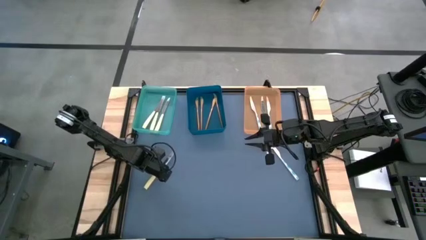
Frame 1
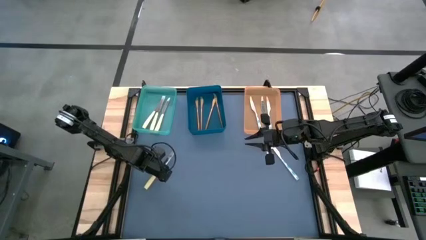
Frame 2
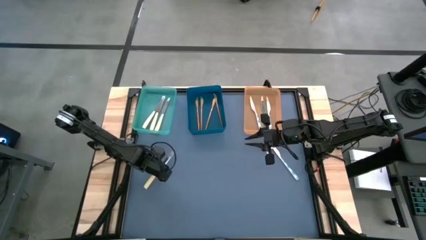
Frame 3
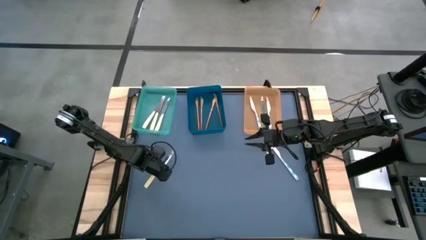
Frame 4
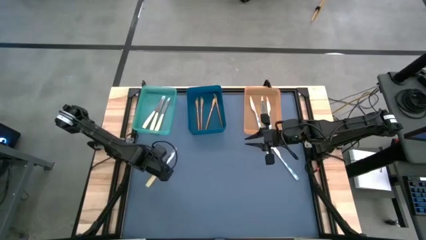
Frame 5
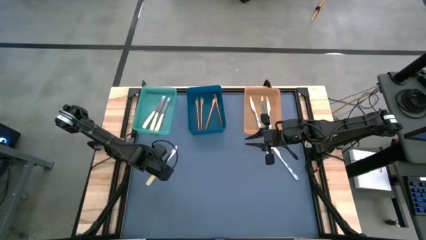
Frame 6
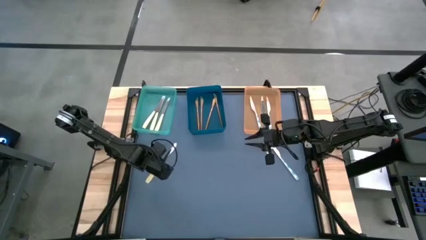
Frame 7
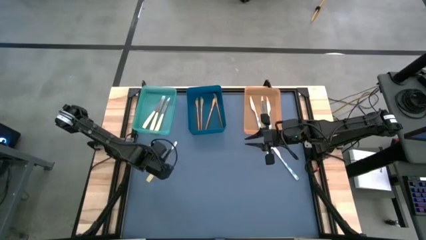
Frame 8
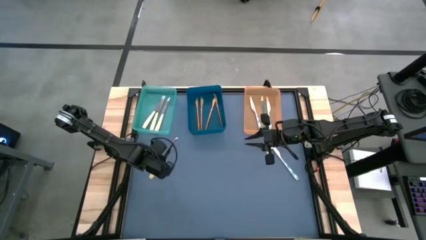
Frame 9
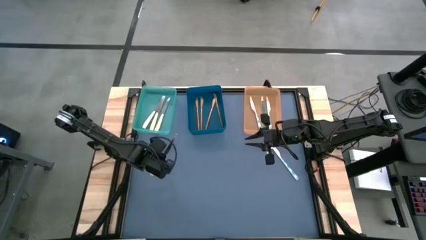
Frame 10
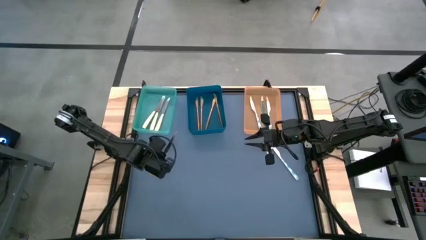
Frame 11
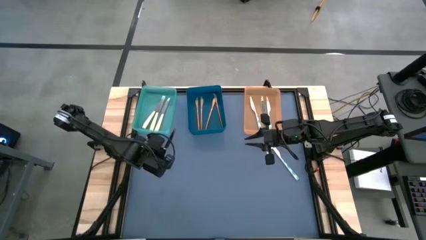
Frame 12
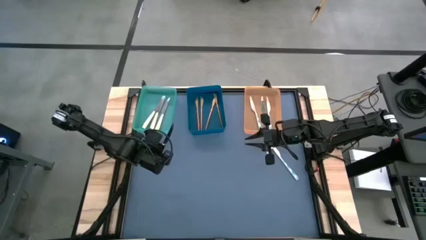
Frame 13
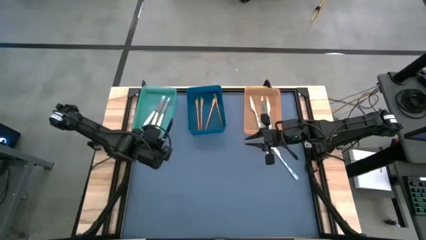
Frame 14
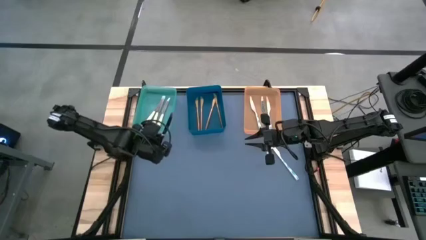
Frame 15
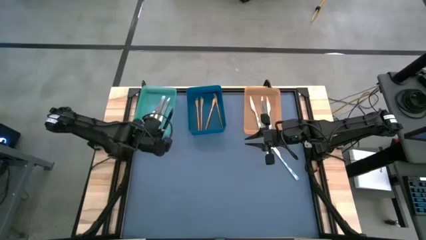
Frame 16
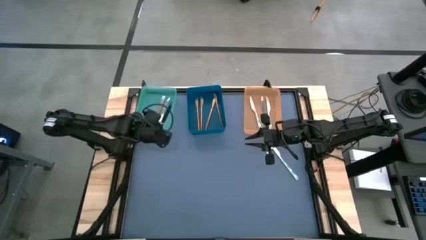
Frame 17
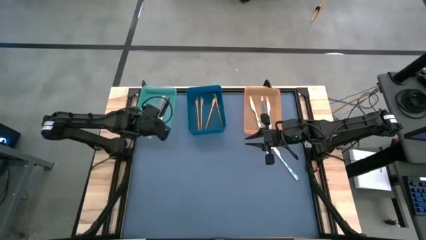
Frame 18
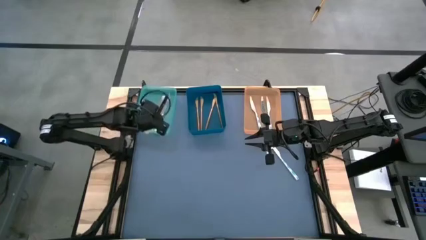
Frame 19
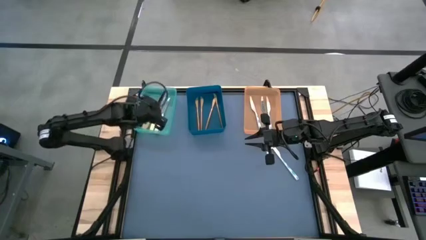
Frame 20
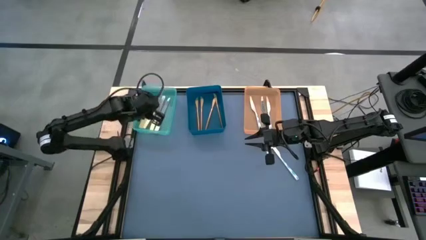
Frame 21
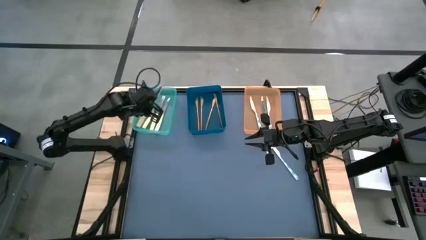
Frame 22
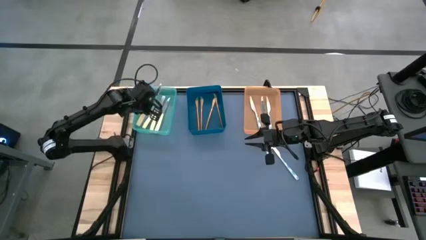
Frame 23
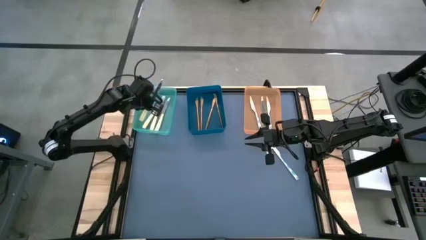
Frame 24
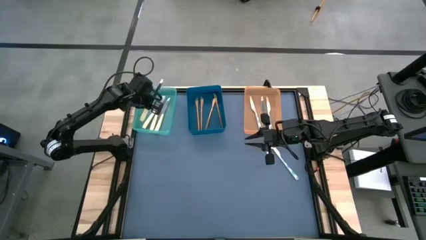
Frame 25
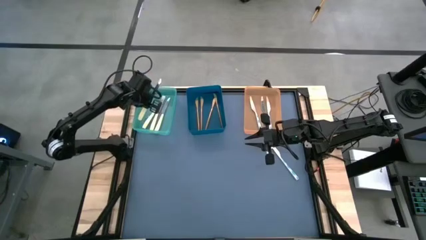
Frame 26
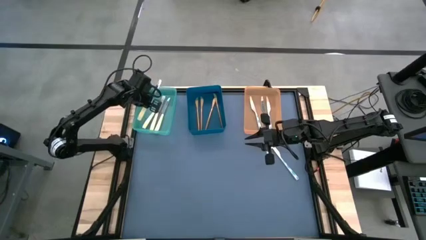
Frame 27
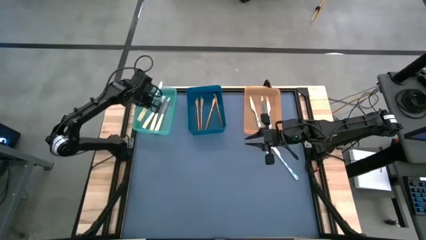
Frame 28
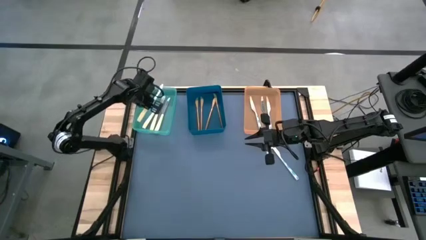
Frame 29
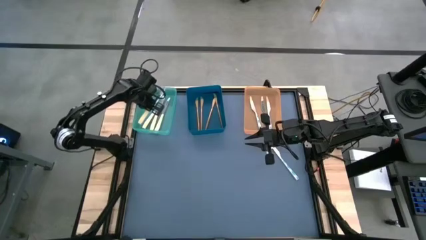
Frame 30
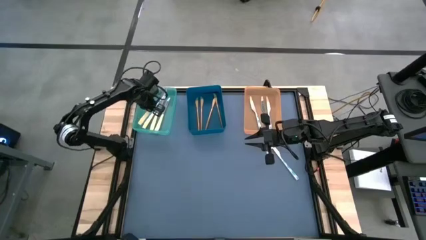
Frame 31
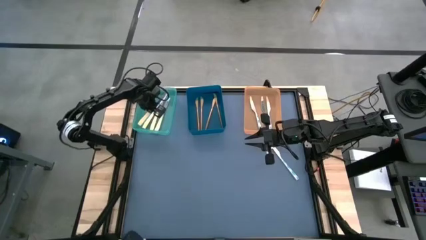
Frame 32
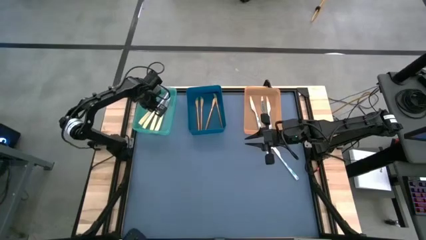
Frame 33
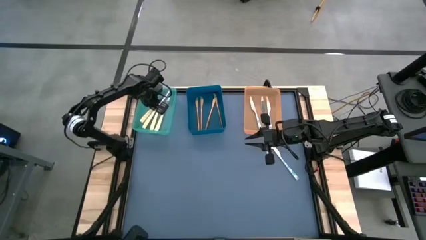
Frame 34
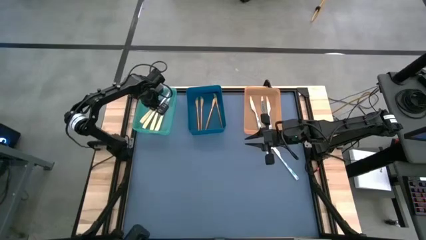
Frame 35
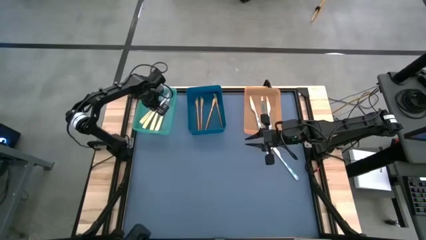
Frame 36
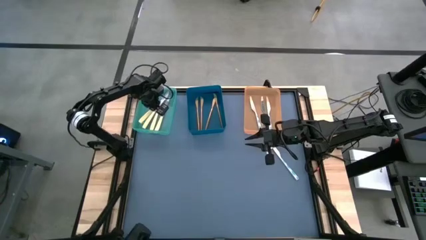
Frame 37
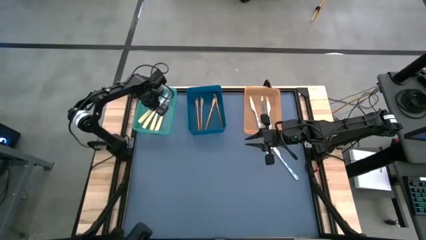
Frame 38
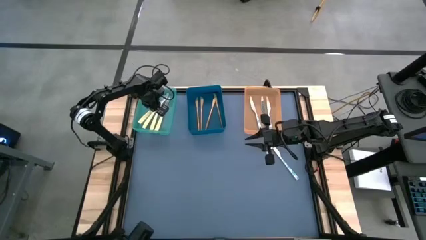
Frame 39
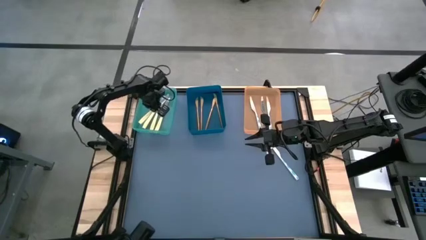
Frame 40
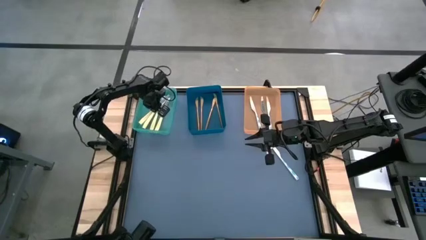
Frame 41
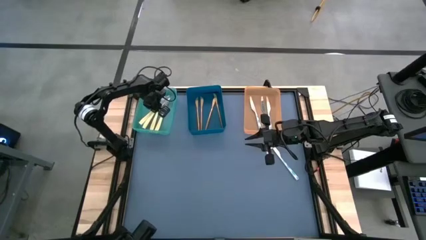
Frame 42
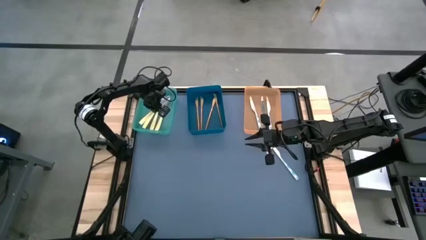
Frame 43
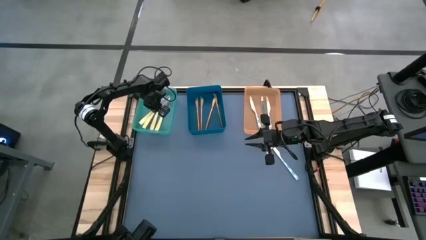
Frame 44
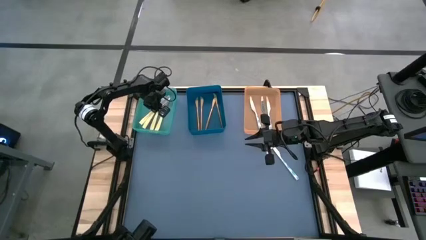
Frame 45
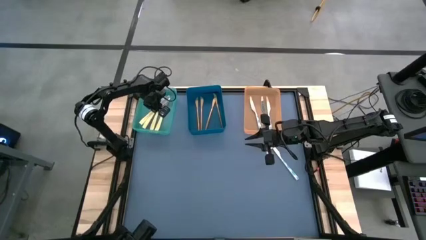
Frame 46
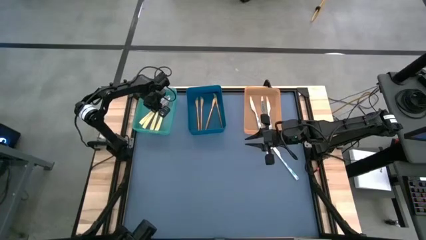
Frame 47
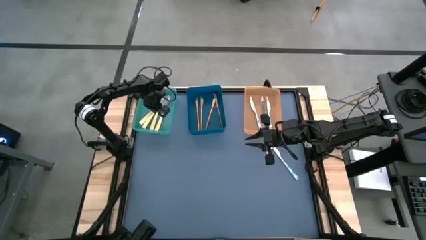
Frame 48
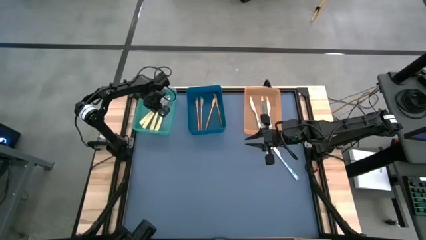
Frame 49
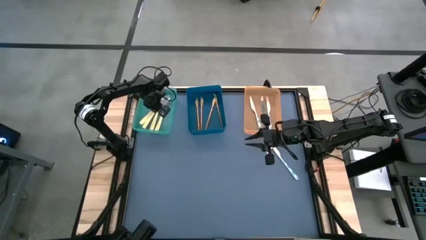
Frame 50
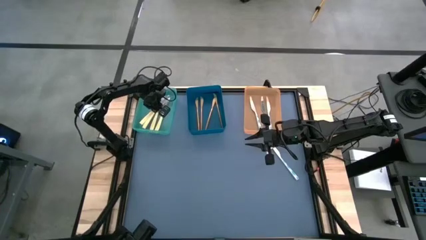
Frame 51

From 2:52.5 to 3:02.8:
Task: Sort silverware by color (type)
Put the yellow knife into the green bin

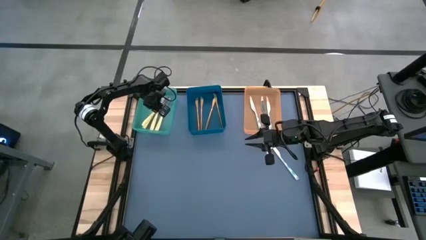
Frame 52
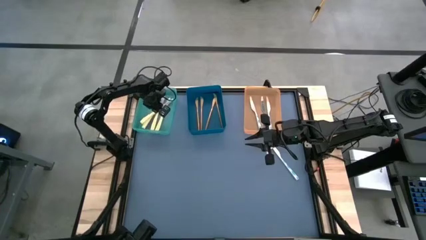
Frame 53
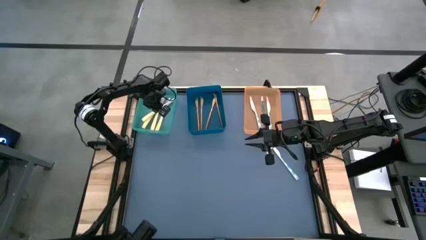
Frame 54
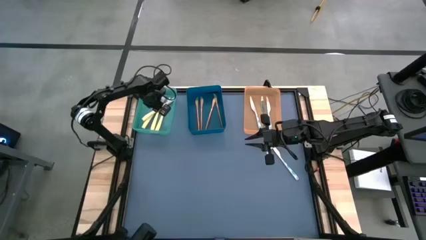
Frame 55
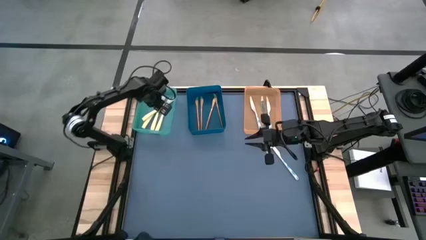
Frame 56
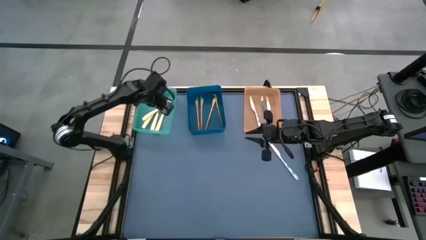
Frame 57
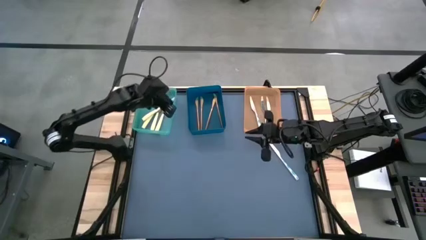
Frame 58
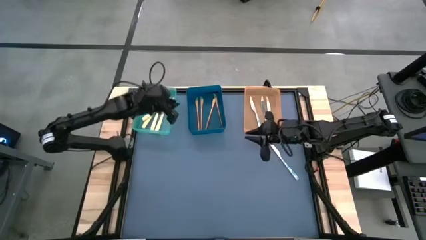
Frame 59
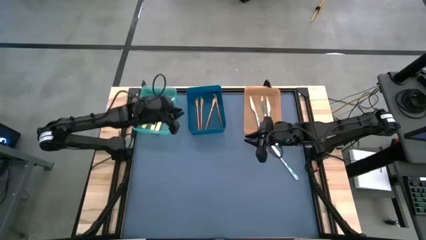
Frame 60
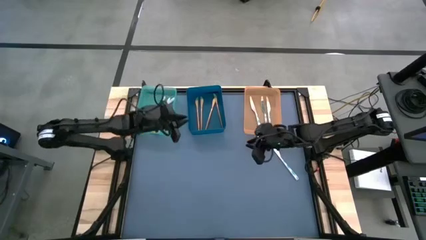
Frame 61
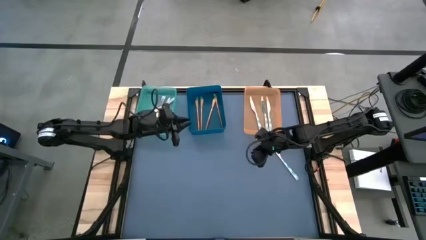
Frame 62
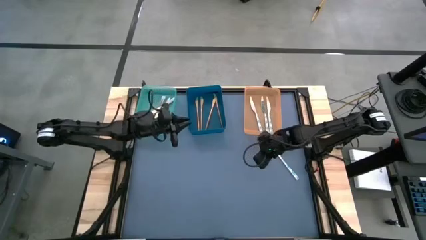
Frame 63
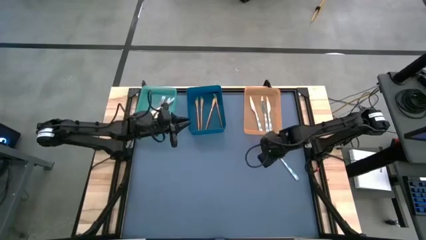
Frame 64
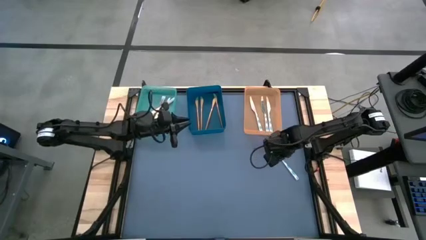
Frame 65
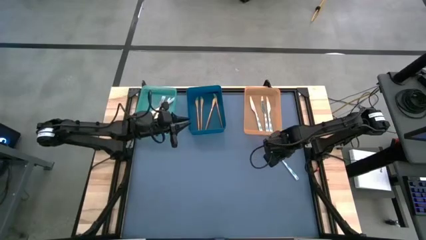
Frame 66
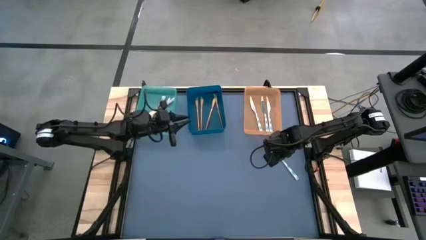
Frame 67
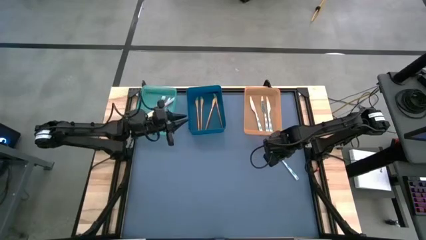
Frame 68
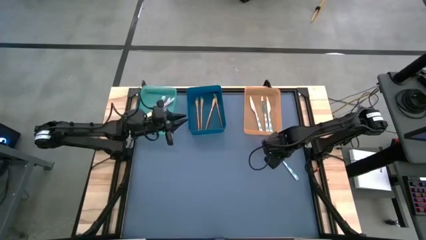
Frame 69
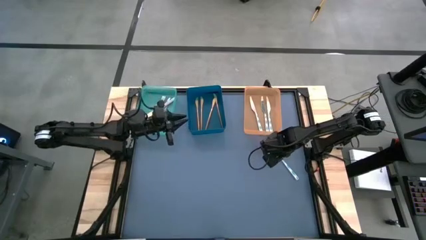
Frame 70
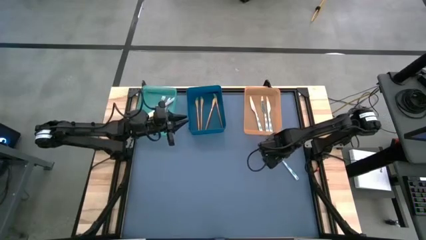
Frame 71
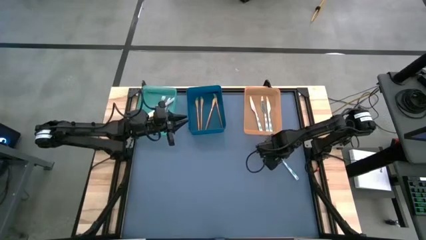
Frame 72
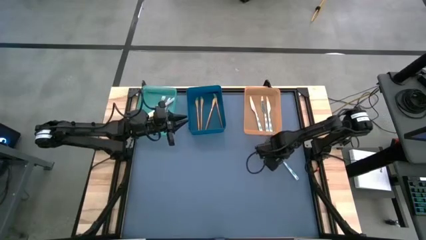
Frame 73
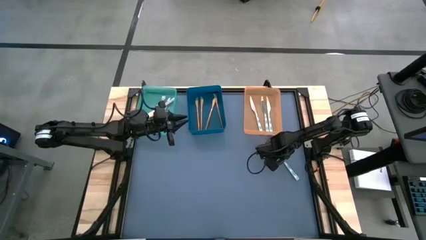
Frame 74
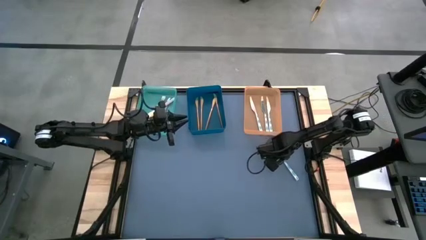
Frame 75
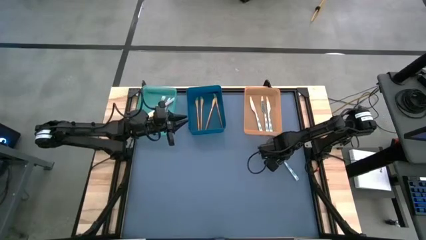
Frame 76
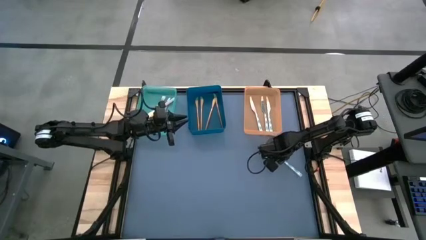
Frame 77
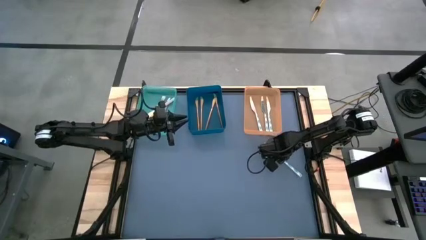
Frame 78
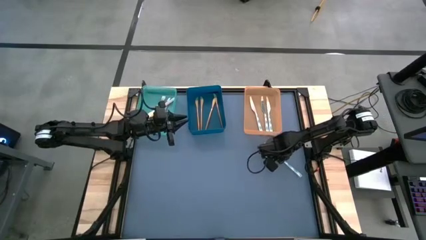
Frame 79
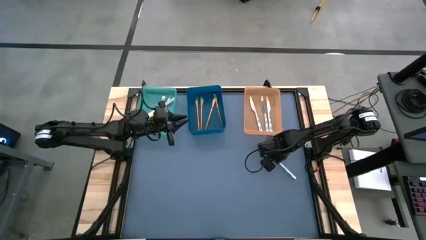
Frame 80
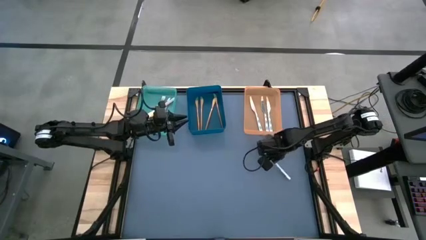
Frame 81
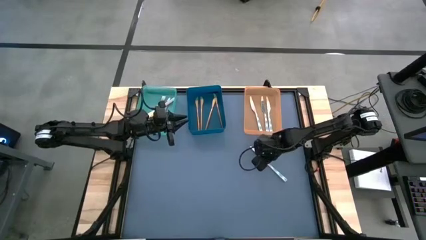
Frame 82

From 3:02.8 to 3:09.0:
Put the white patterned table knife into the orange bin
